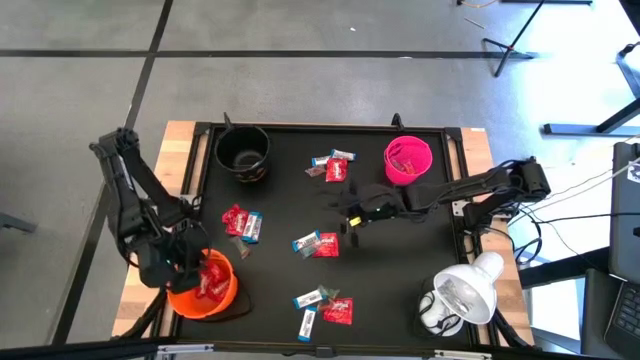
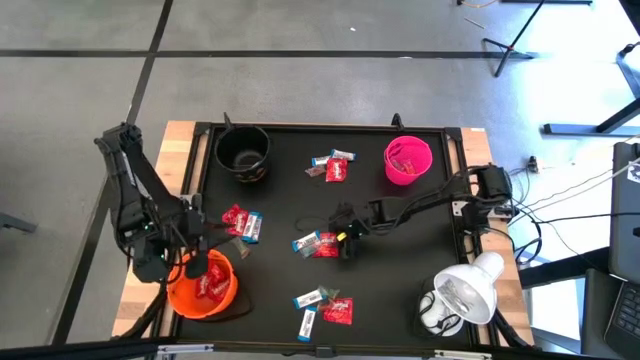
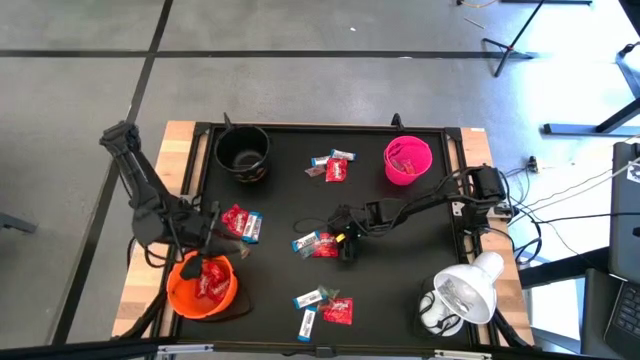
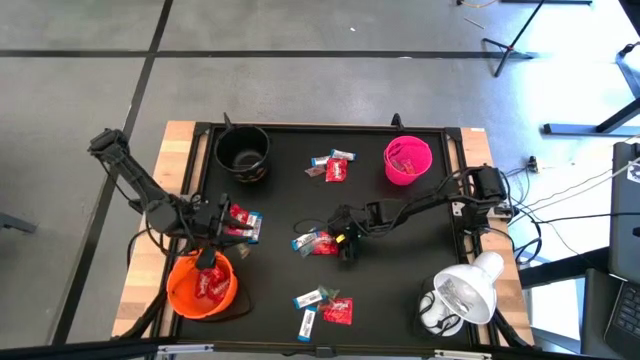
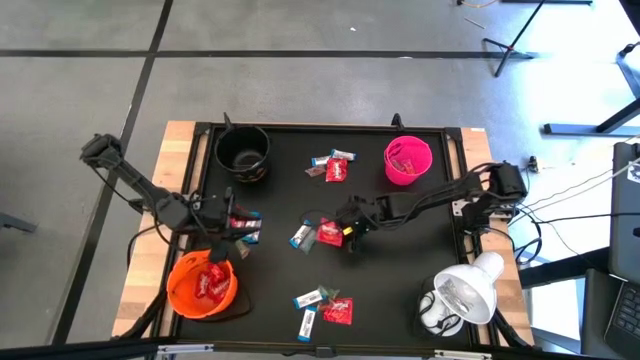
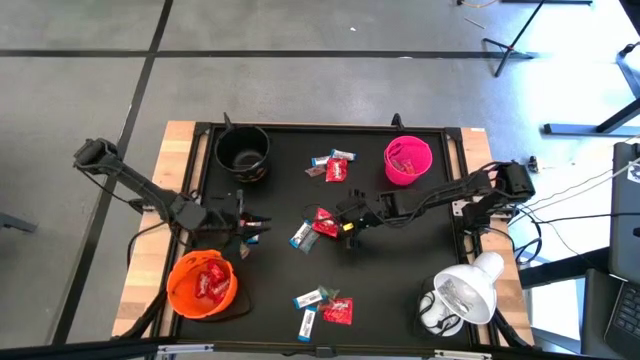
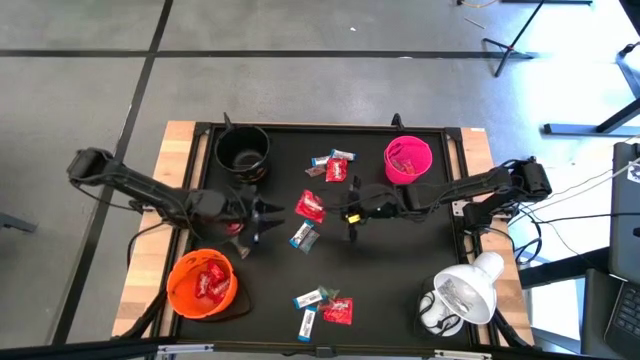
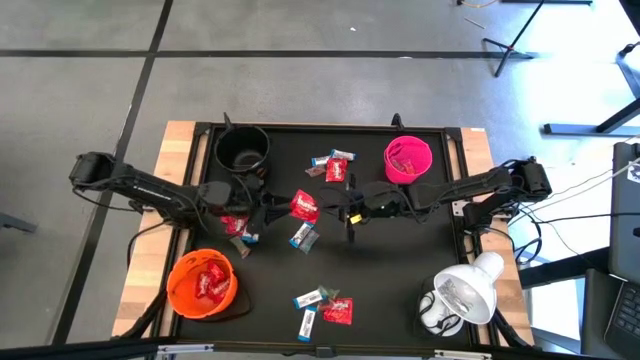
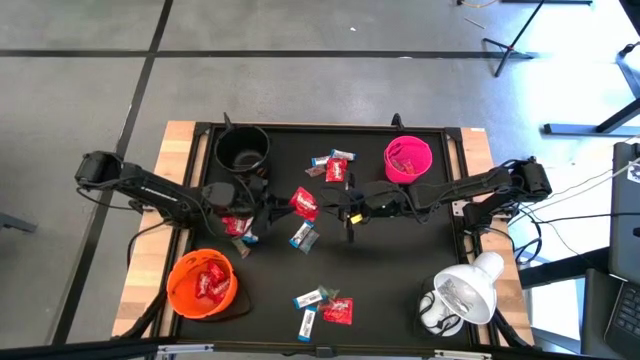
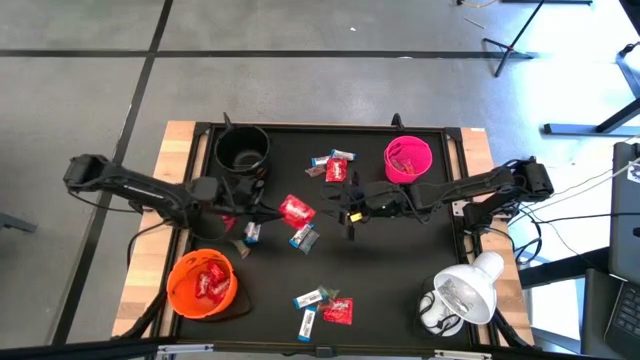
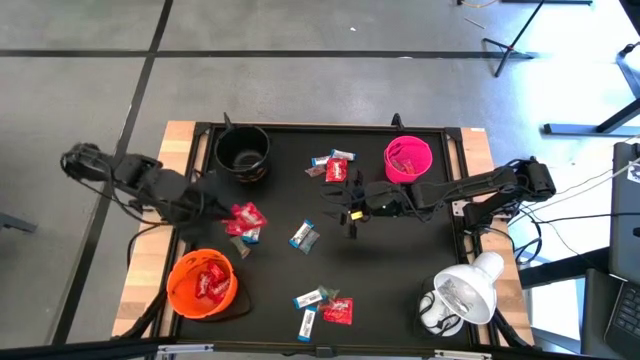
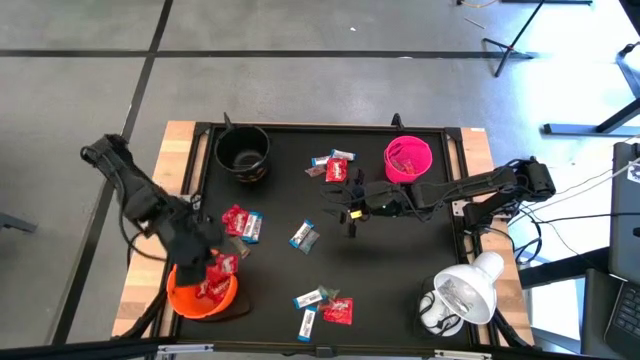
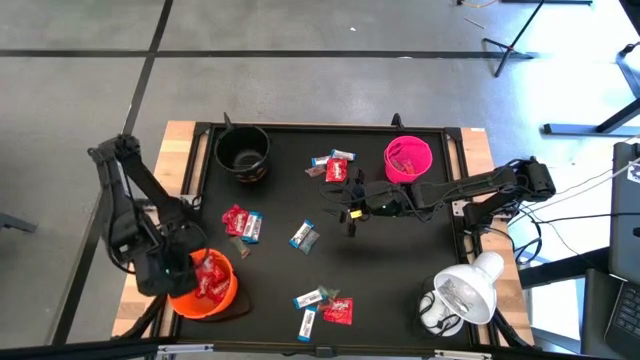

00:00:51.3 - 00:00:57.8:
Task: Sort candy
Put the red candy into the orange bucket

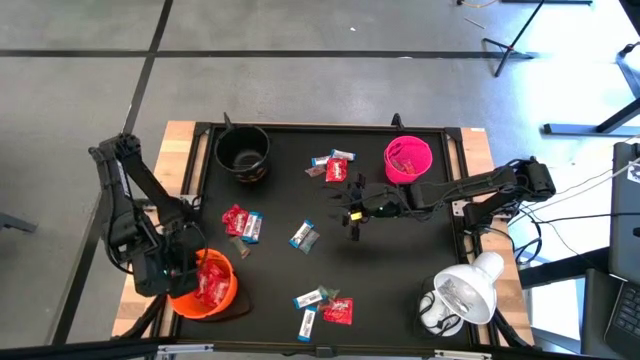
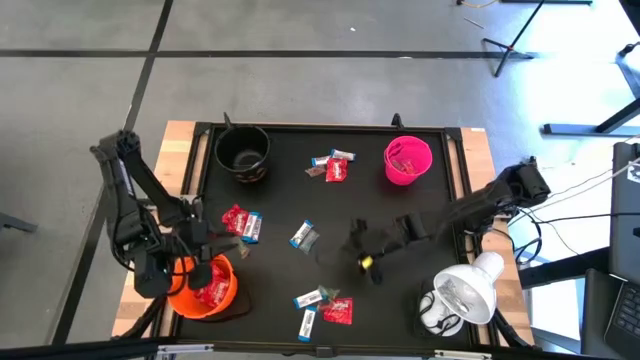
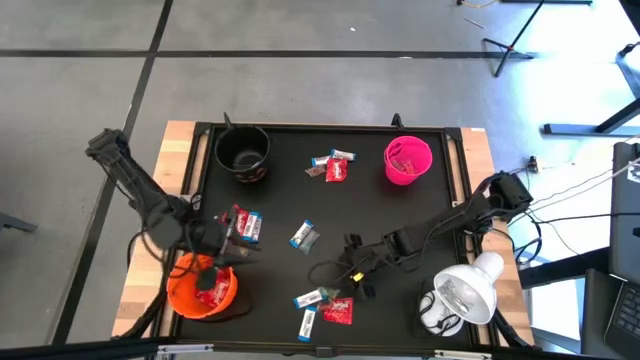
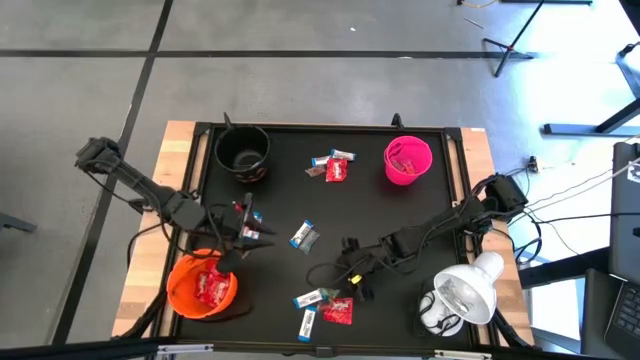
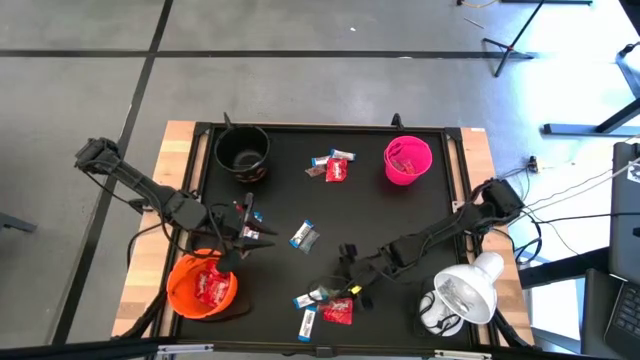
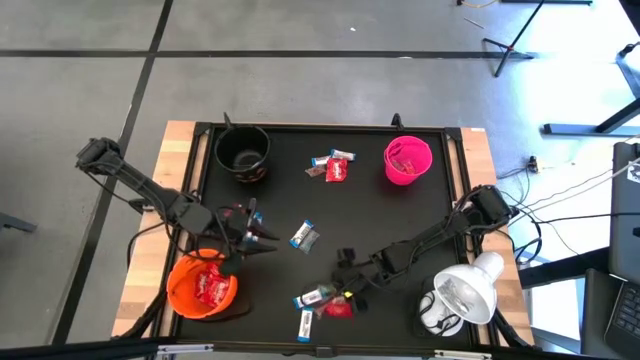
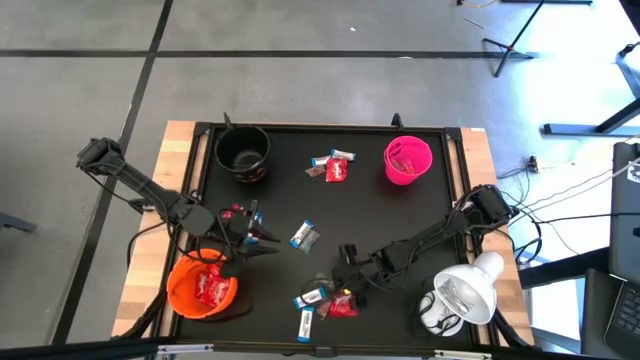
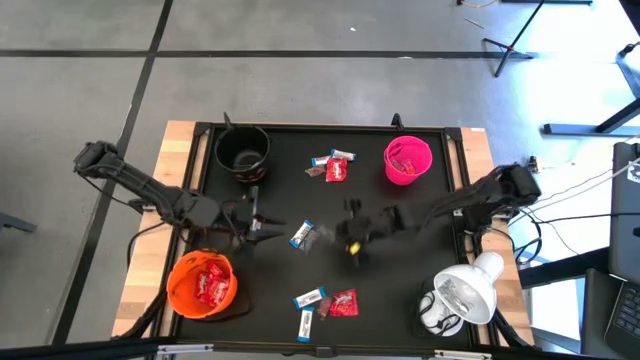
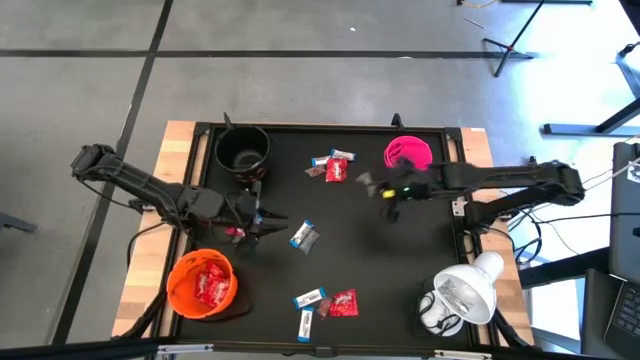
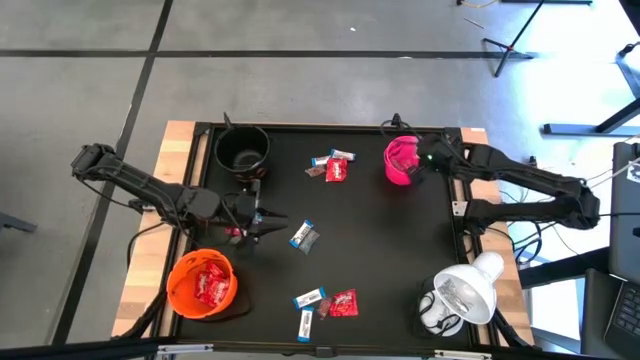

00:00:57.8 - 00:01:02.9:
Put the green gummy into the pink bucket

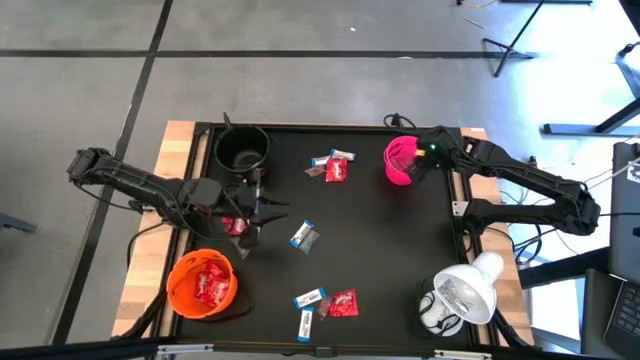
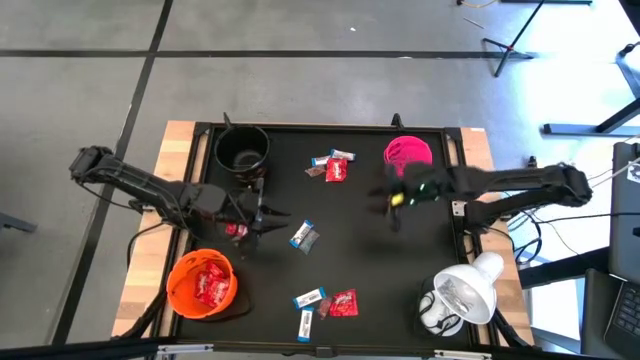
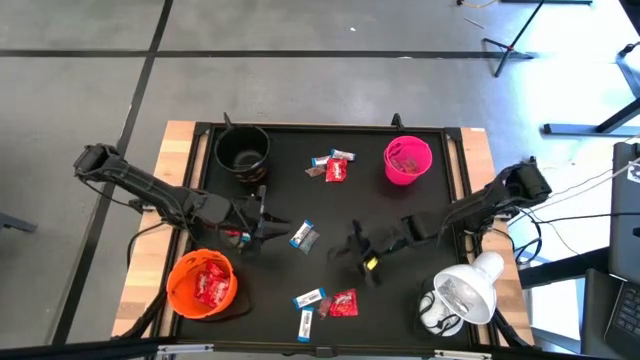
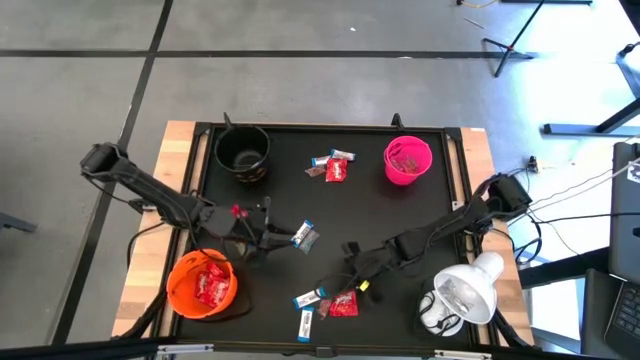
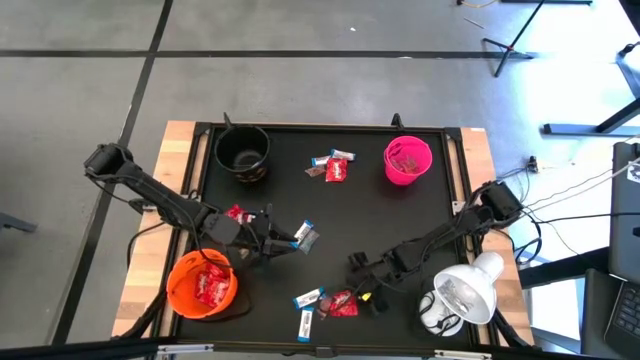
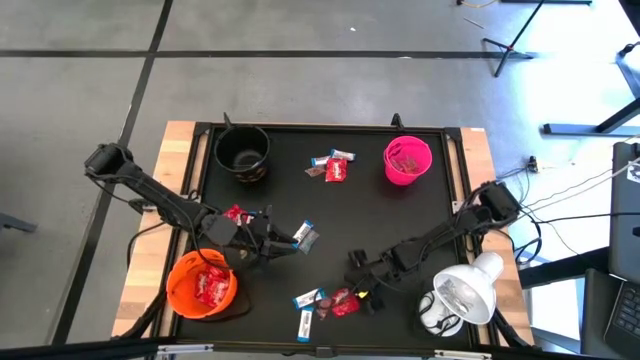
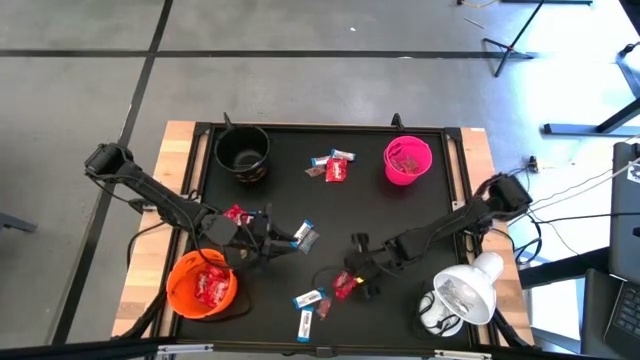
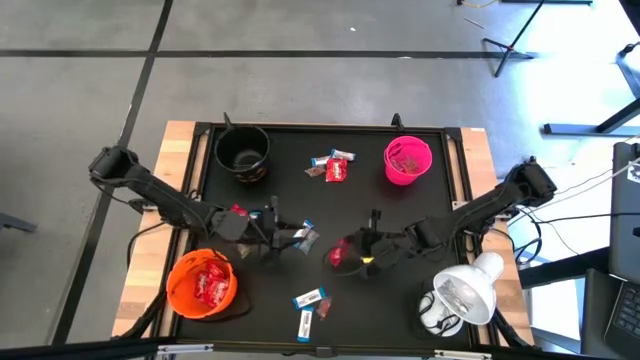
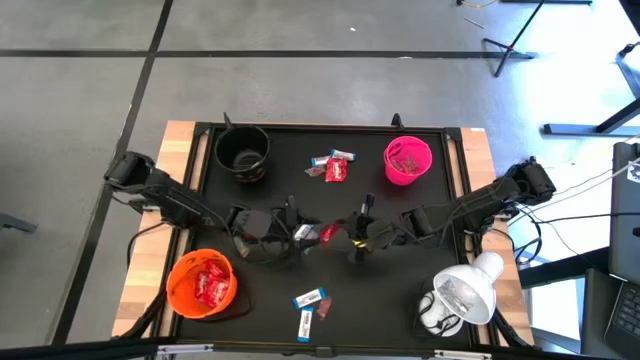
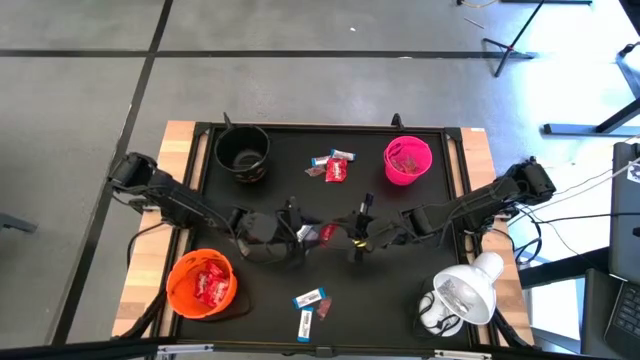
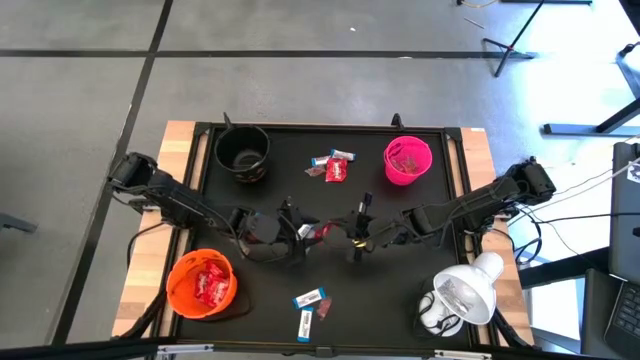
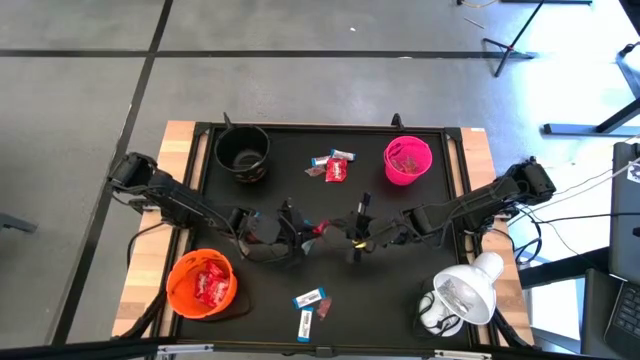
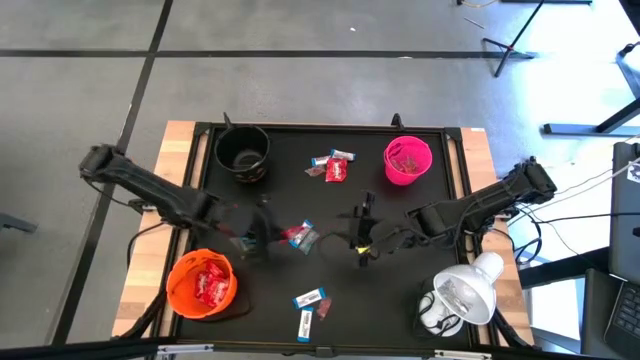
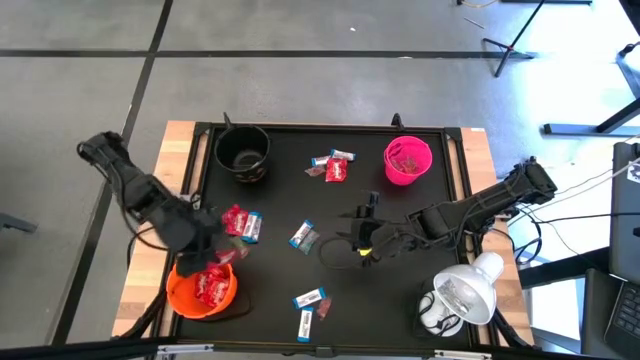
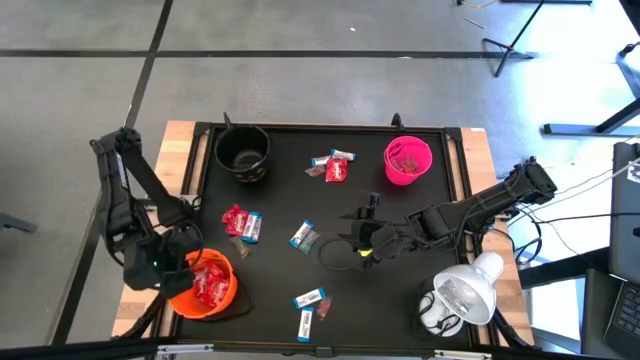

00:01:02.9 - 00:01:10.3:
Put the red candy into the orange bucket
